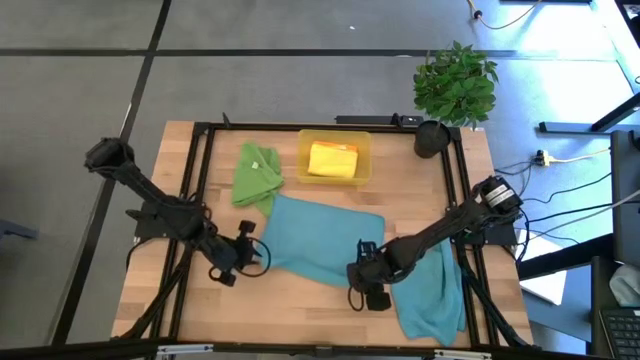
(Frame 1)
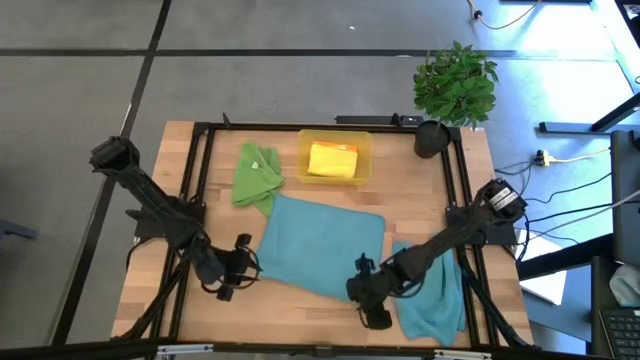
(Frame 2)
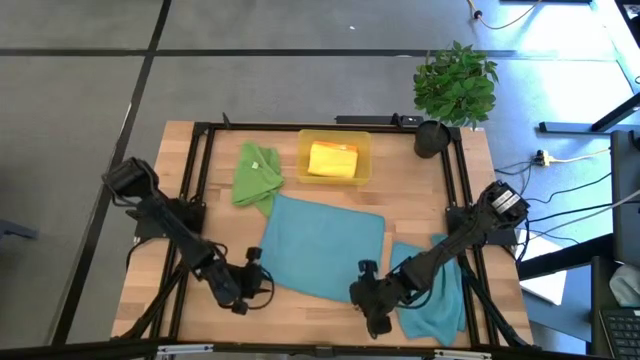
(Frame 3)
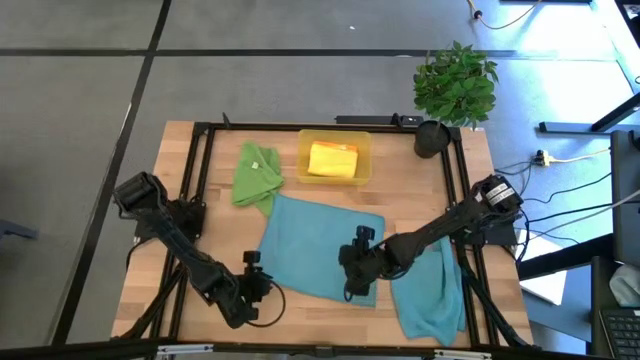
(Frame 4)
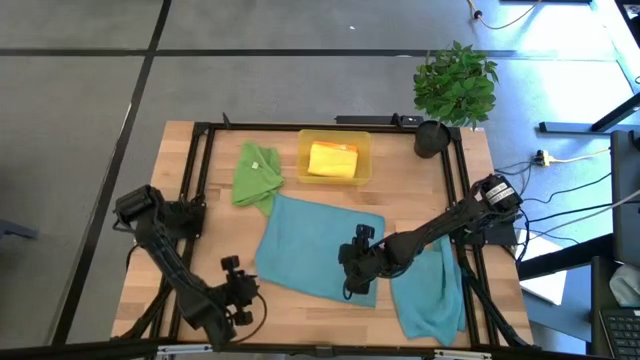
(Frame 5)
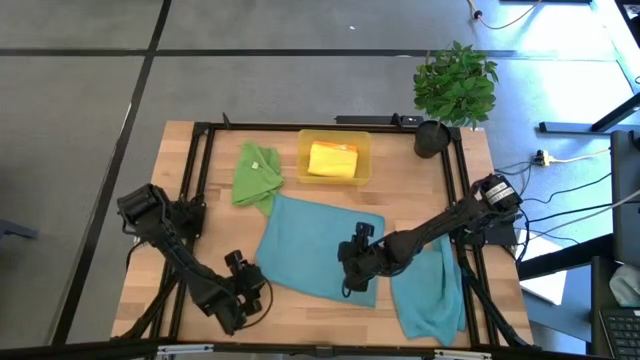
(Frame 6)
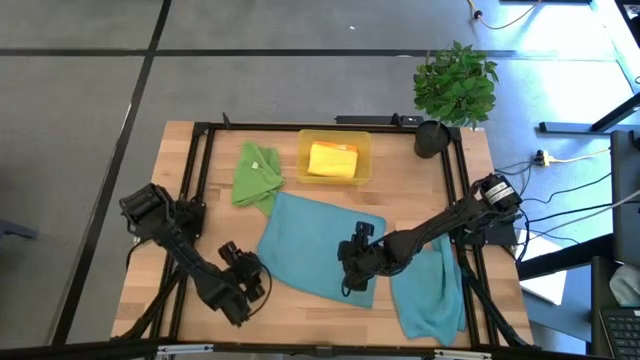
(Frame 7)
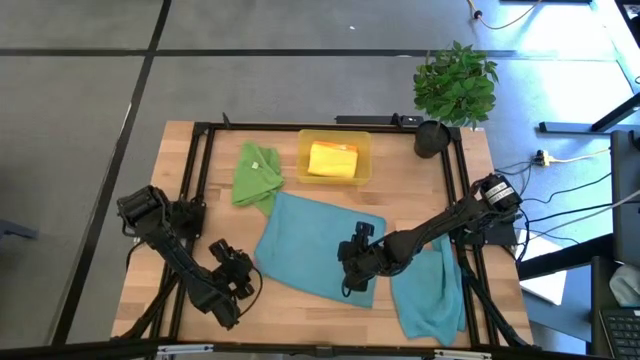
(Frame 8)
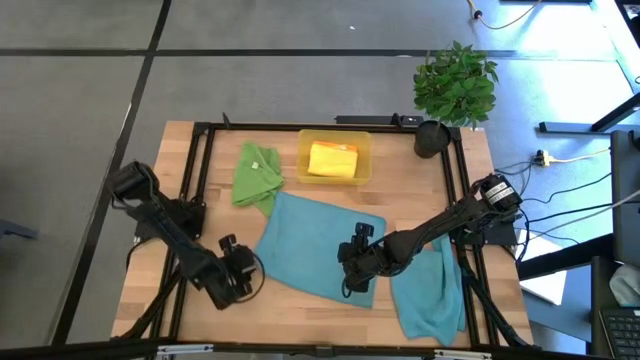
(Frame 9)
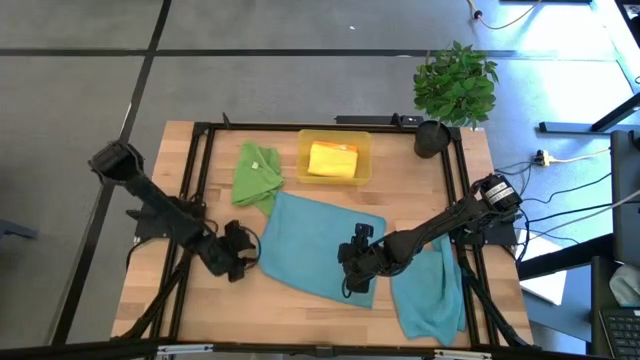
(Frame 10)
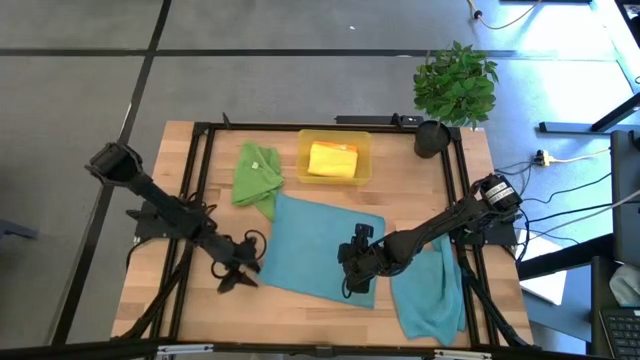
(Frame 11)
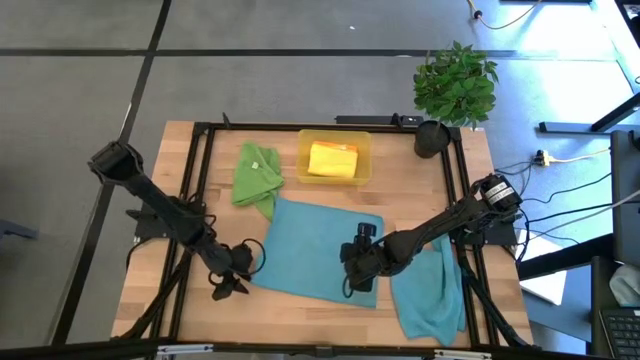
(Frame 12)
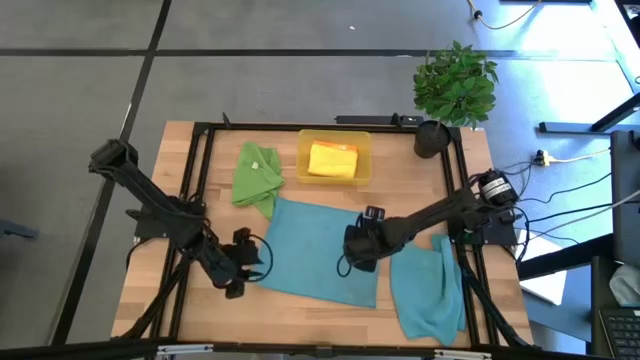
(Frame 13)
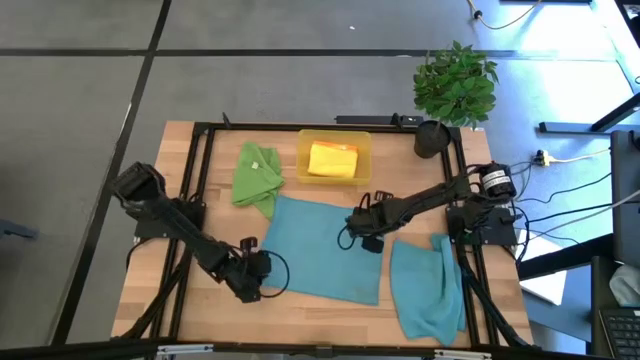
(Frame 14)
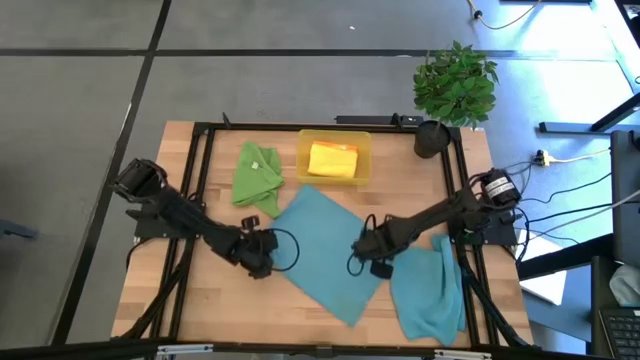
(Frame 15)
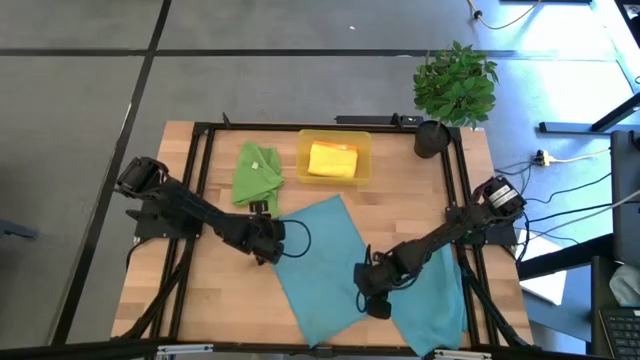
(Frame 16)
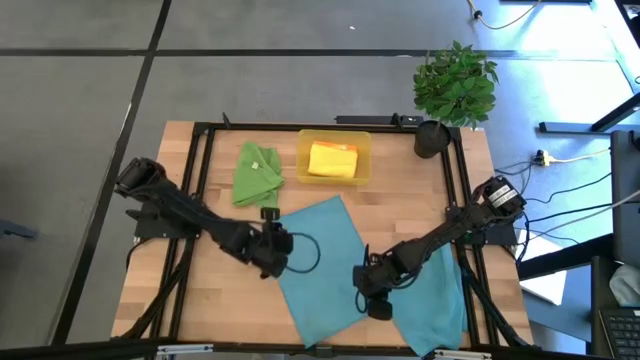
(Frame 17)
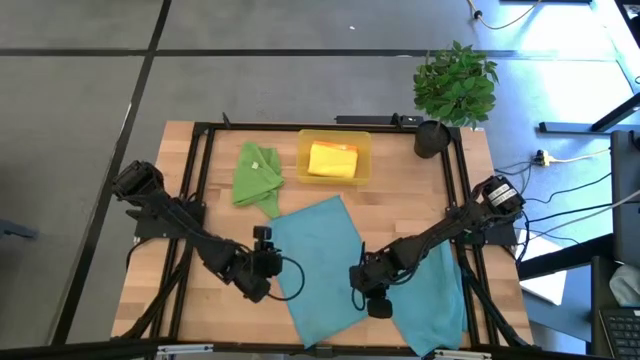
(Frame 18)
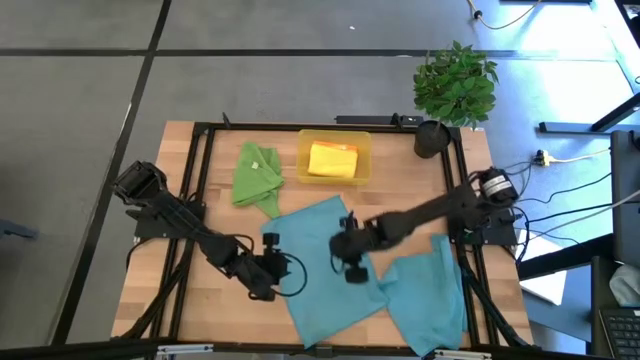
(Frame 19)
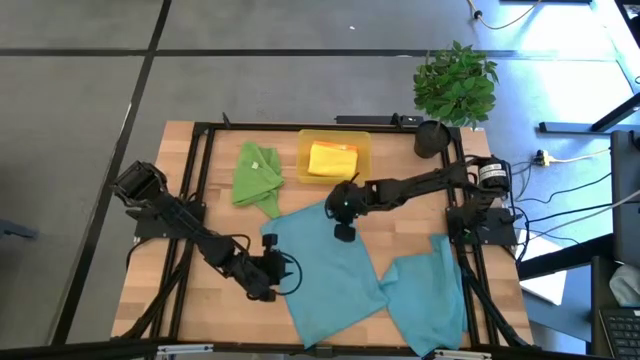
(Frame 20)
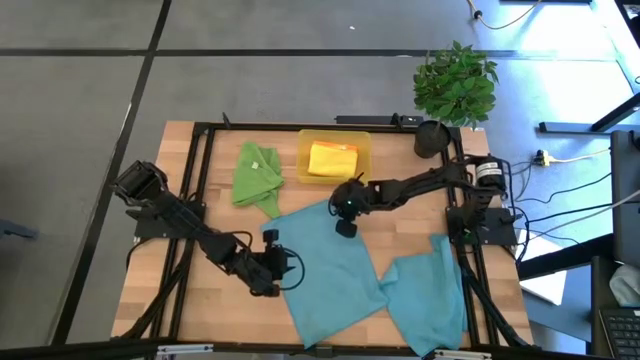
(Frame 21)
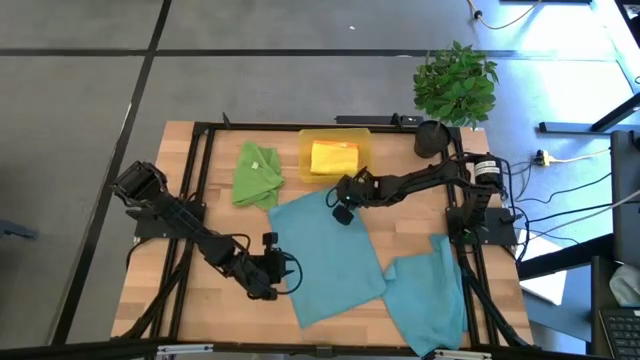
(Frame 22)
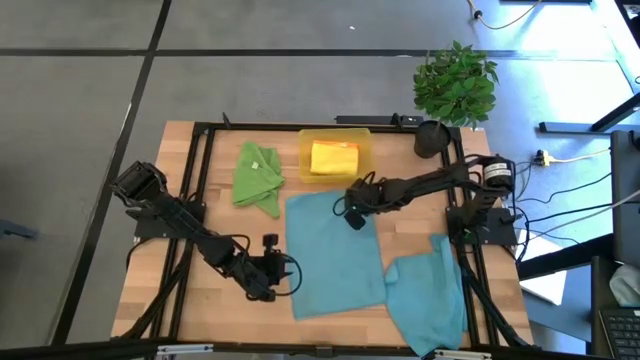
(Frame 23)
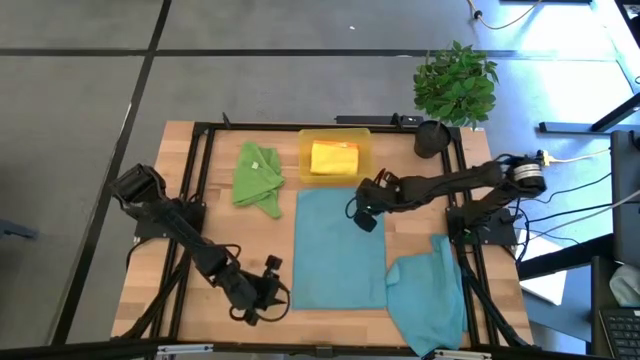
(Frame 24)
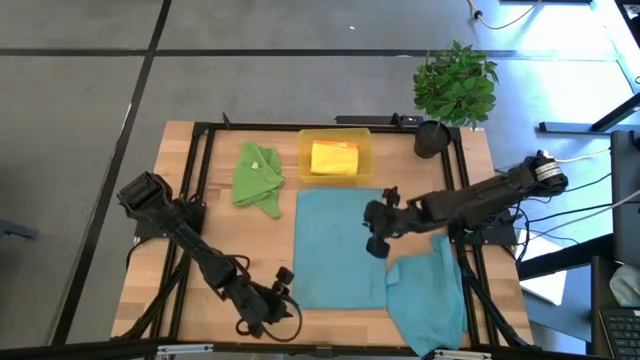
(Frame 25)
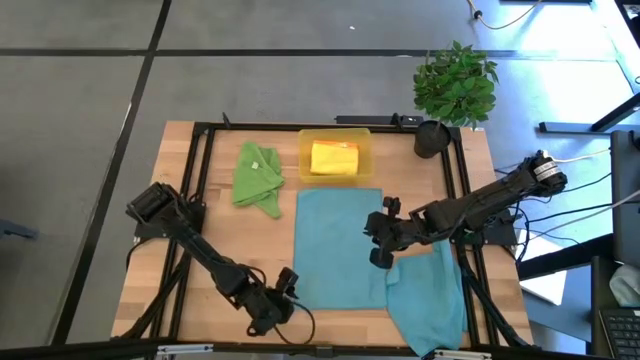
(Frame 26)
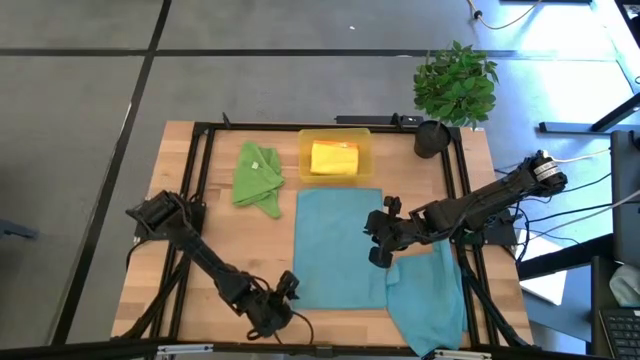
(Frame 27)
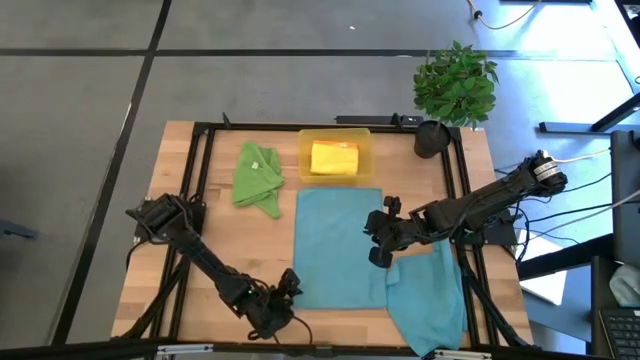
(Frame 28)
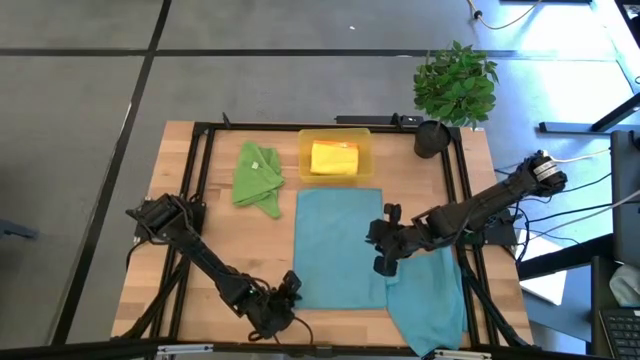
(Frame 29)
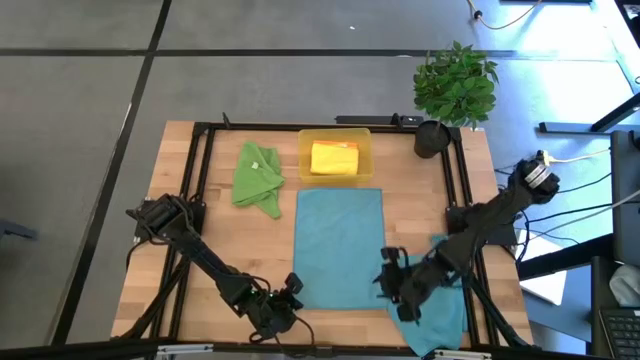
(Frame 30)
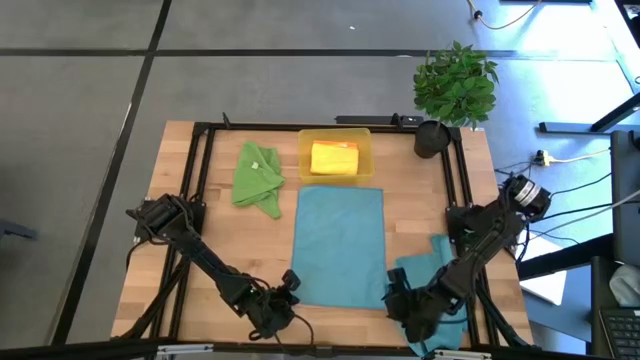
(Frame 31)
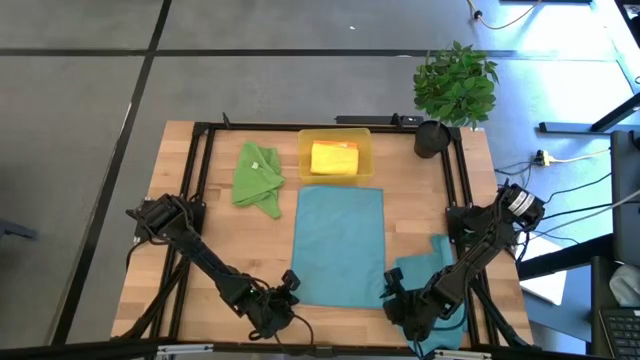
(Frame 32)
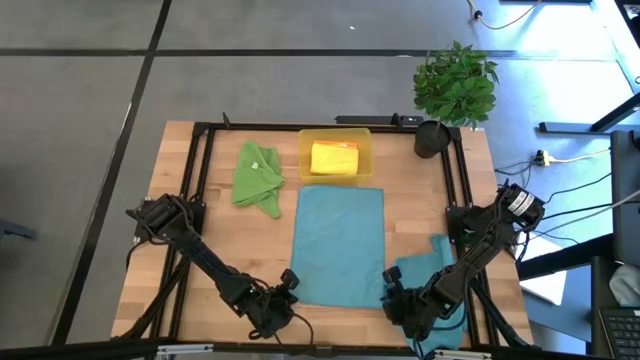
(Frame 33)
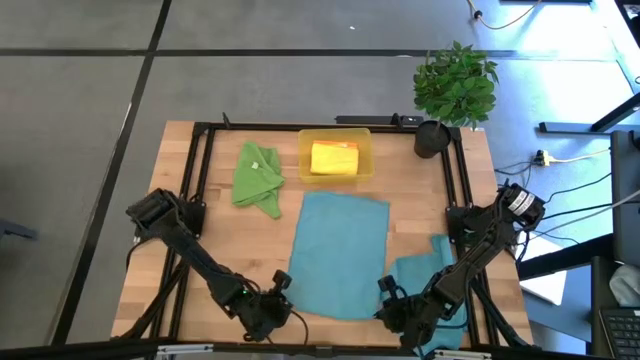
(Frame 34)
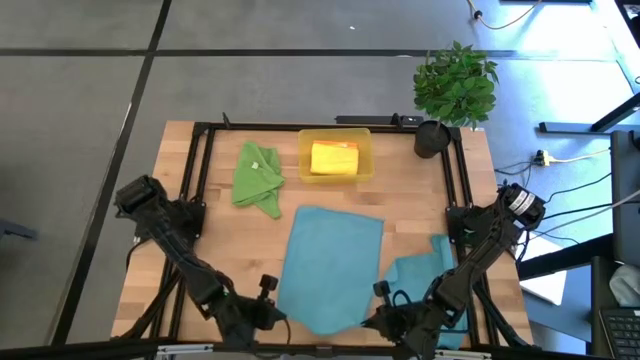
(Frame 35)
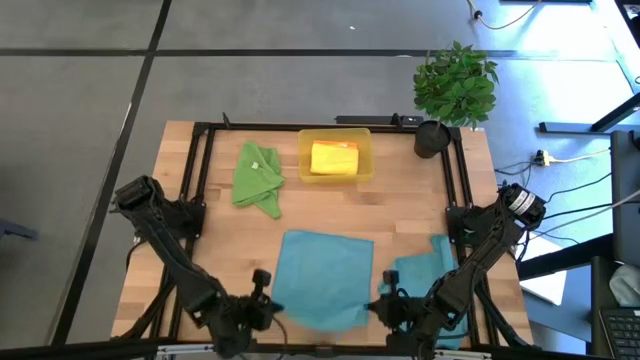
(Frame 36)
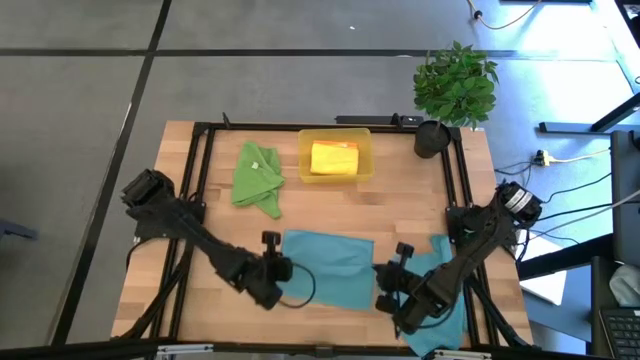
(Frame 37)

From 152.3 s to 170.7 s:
Task: Fold microfiber towels
Fold the top blue microfiber cloth

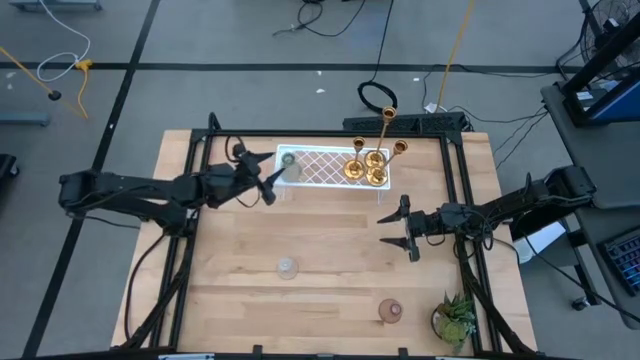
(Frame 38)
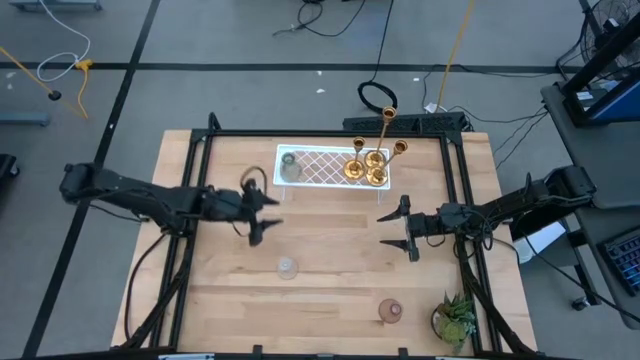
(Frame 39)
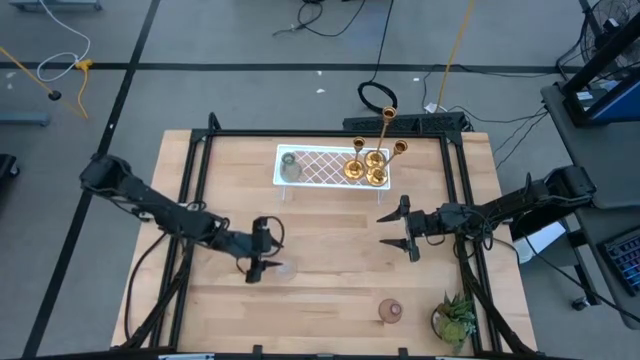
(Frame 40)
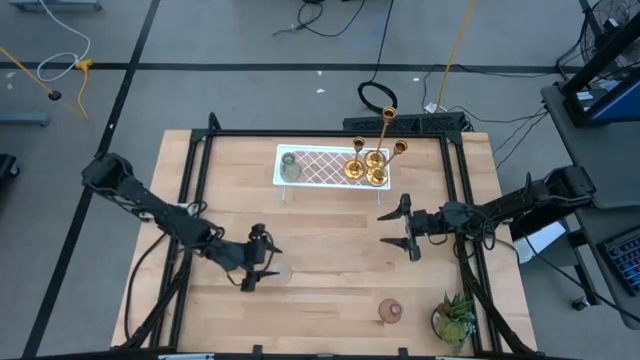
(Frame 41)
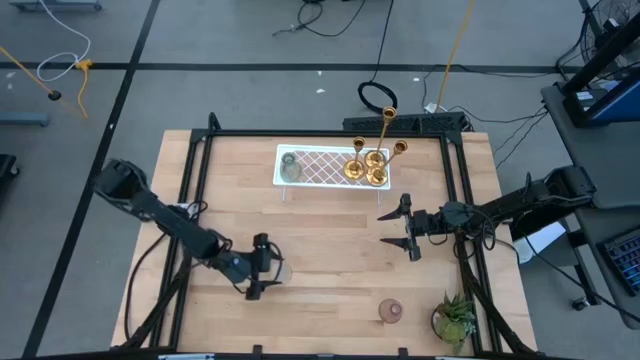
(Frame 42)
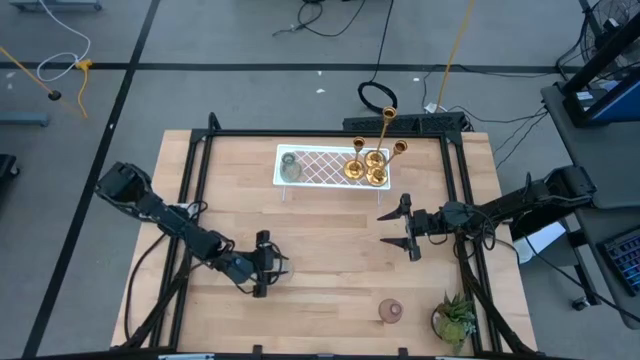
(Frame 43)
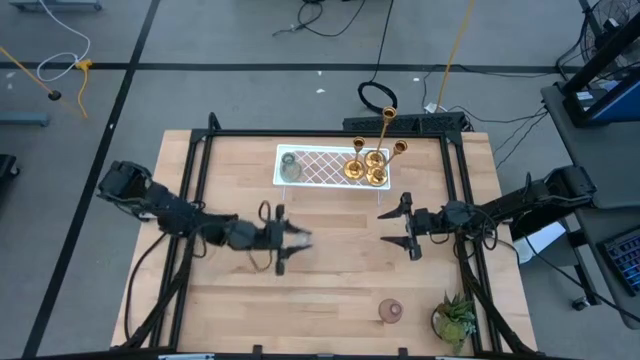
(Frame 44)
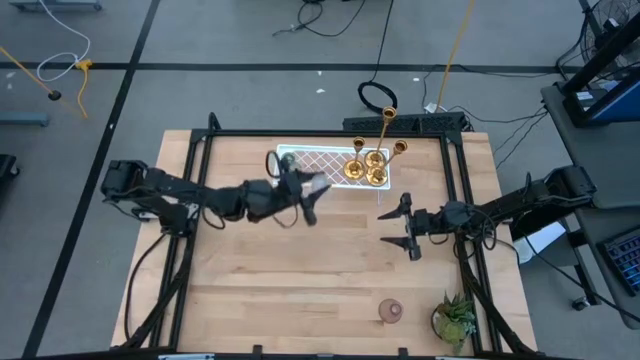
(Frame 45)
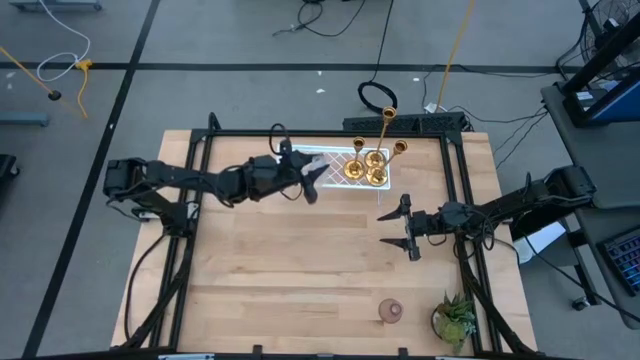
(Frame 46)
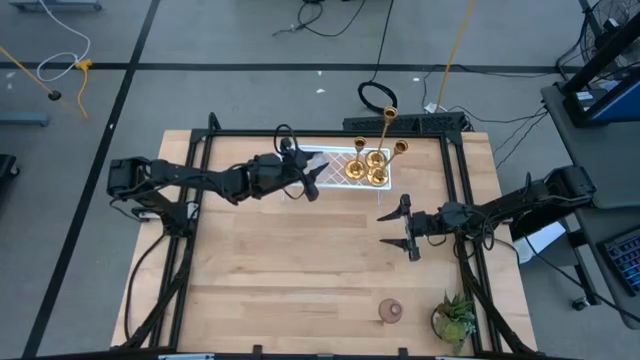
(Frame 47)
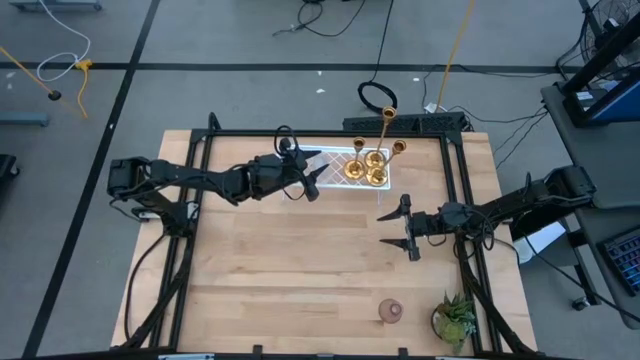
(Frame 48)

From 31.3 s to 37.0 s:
Task: Pick & Place candle stick holders
Put the transparent candle holder on the shelf
